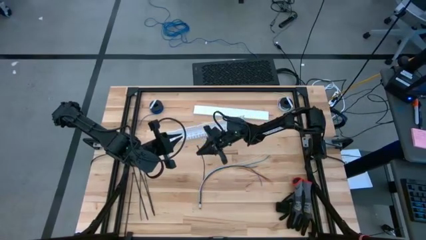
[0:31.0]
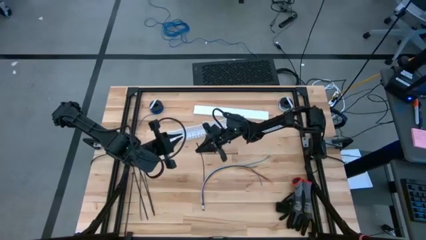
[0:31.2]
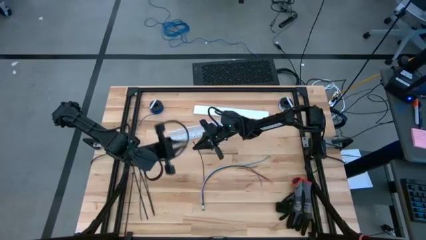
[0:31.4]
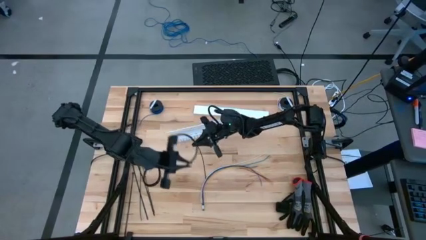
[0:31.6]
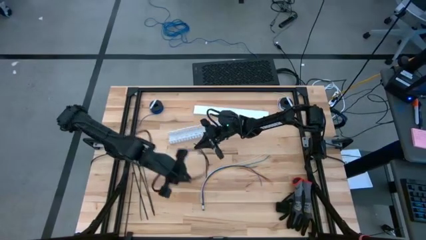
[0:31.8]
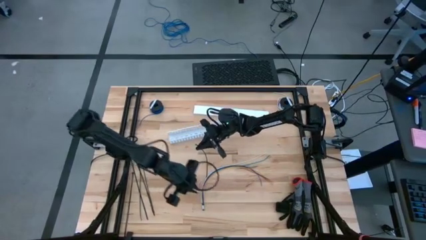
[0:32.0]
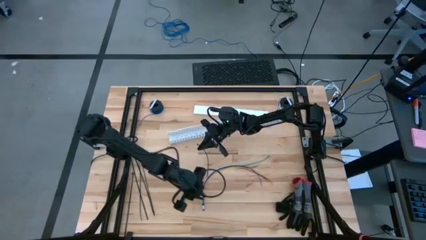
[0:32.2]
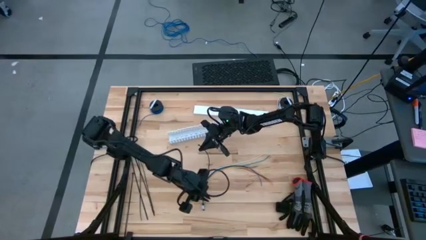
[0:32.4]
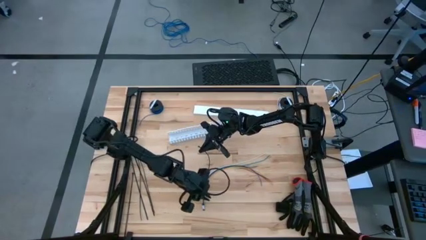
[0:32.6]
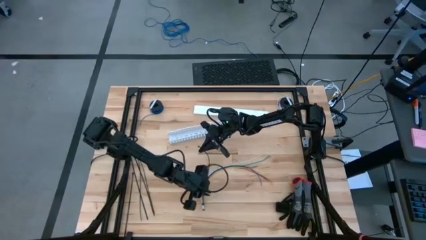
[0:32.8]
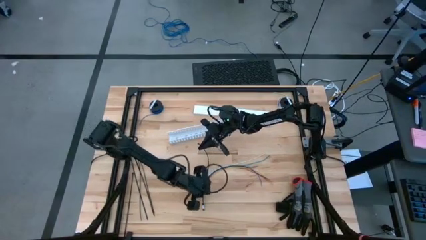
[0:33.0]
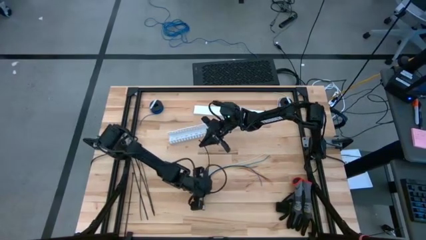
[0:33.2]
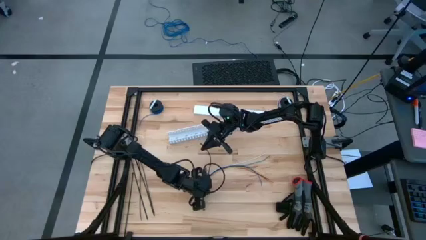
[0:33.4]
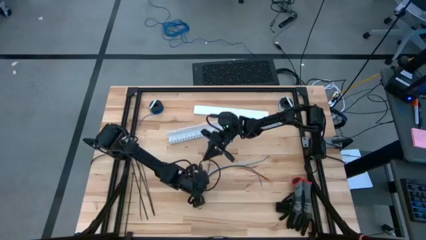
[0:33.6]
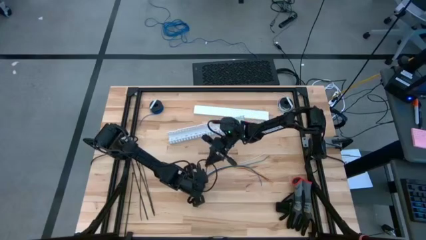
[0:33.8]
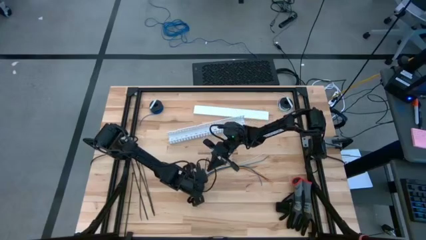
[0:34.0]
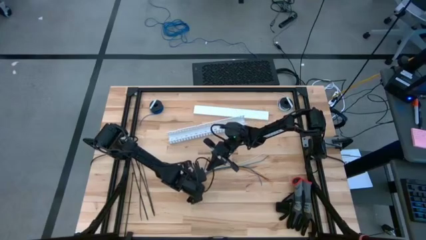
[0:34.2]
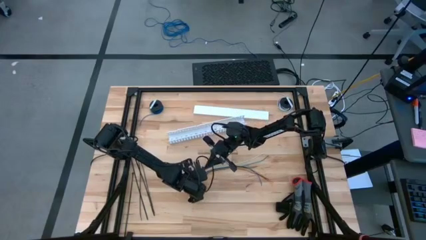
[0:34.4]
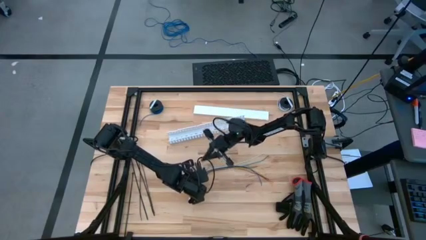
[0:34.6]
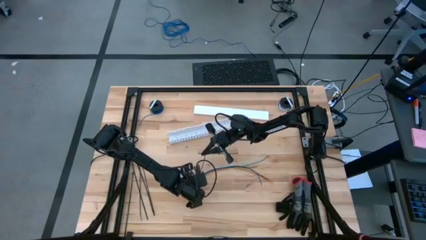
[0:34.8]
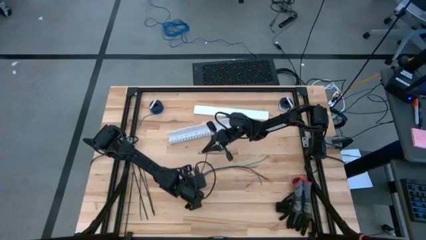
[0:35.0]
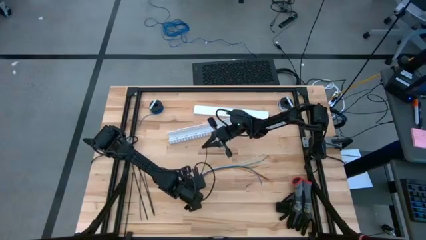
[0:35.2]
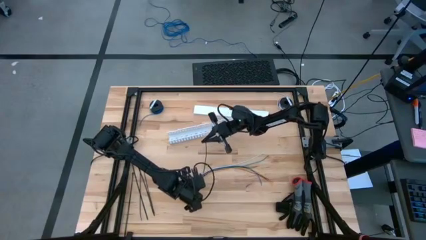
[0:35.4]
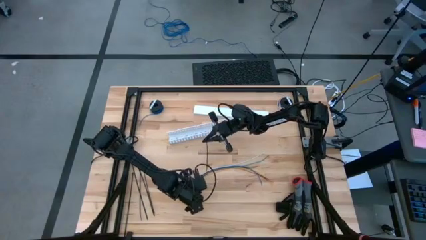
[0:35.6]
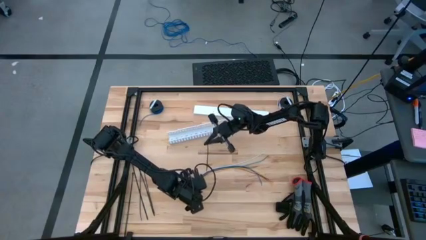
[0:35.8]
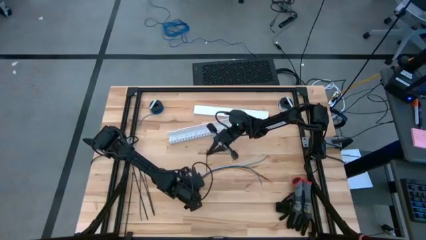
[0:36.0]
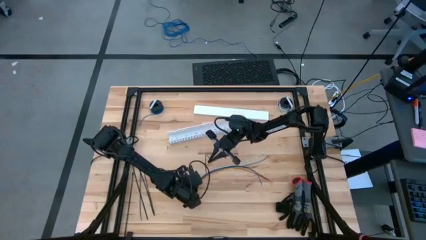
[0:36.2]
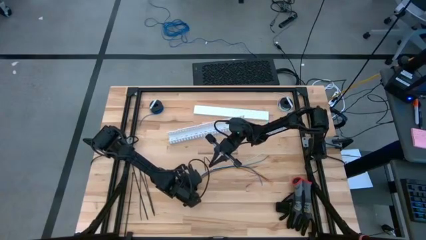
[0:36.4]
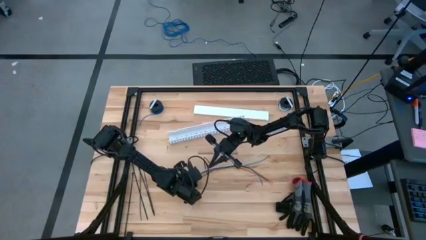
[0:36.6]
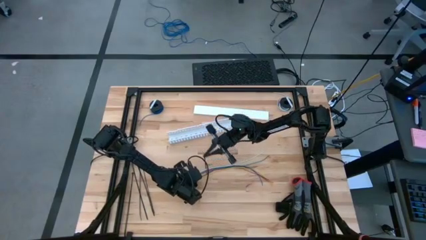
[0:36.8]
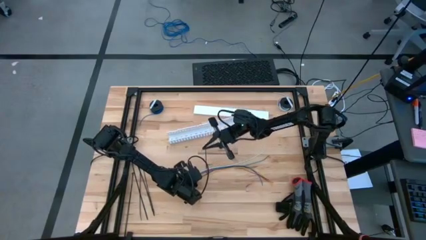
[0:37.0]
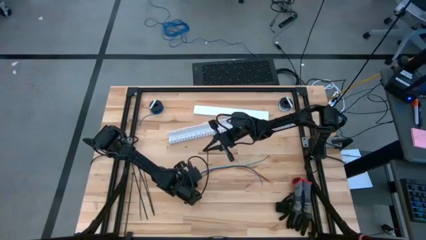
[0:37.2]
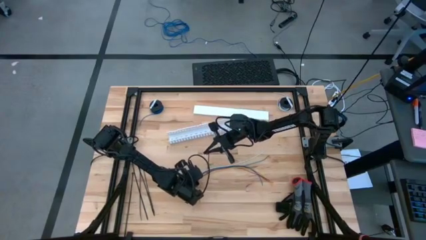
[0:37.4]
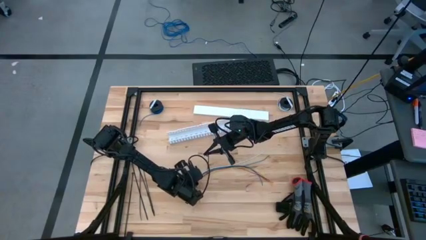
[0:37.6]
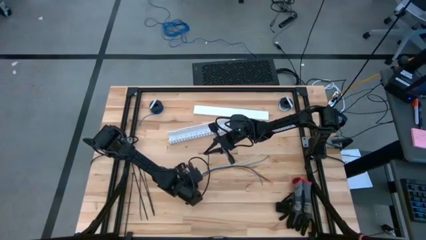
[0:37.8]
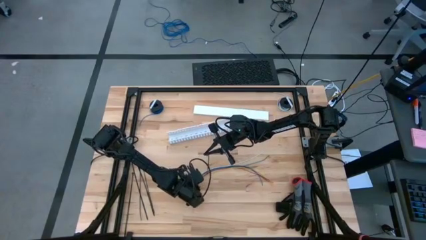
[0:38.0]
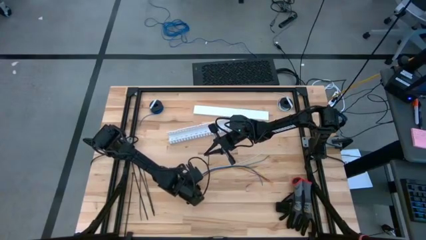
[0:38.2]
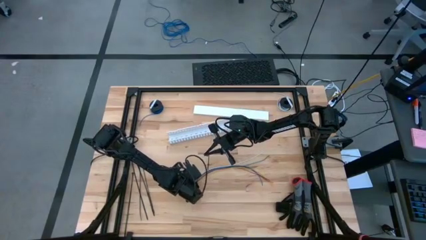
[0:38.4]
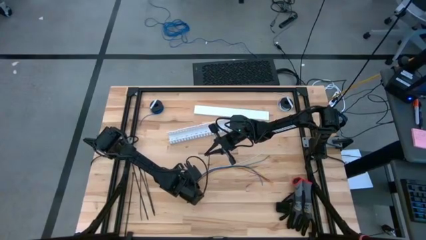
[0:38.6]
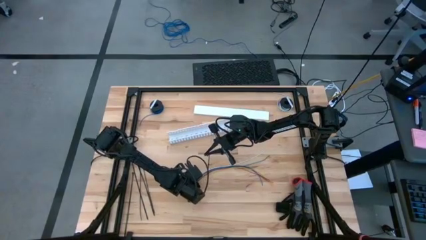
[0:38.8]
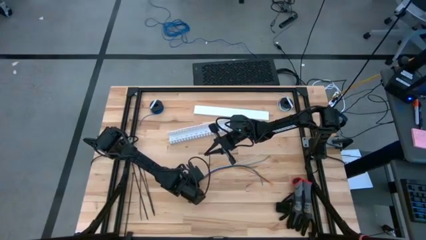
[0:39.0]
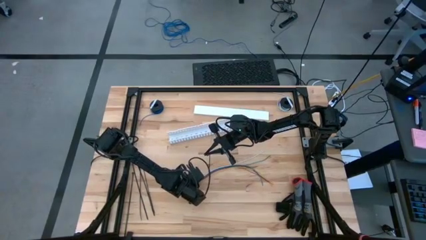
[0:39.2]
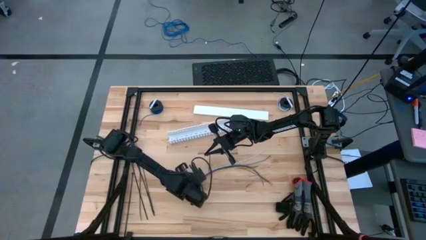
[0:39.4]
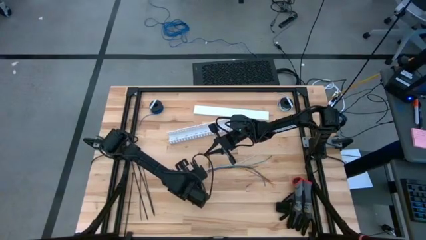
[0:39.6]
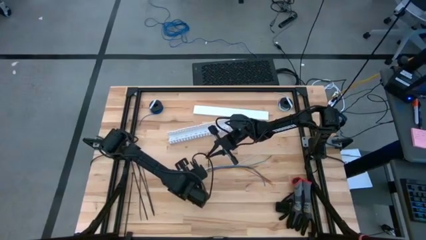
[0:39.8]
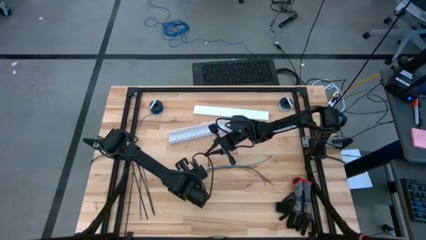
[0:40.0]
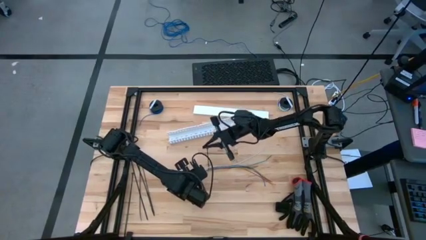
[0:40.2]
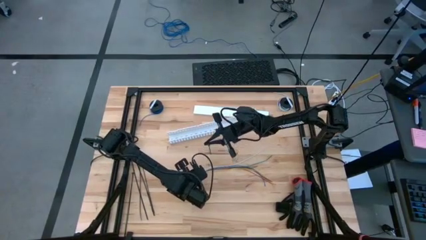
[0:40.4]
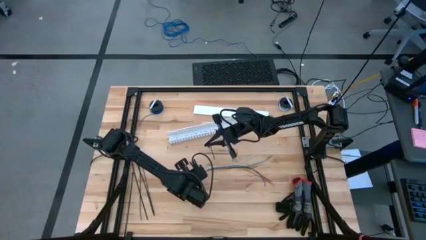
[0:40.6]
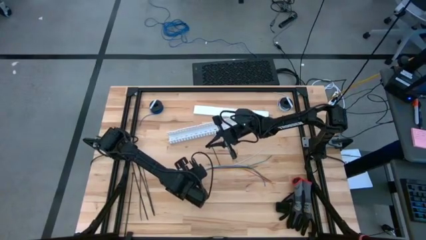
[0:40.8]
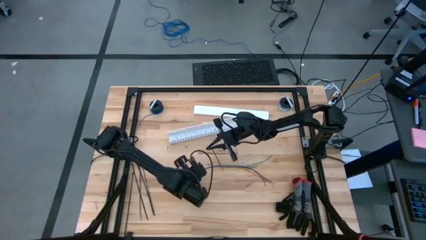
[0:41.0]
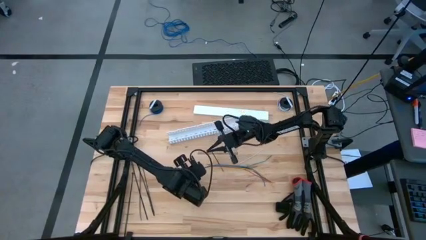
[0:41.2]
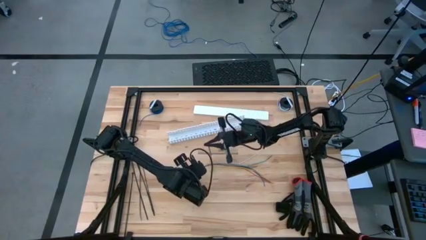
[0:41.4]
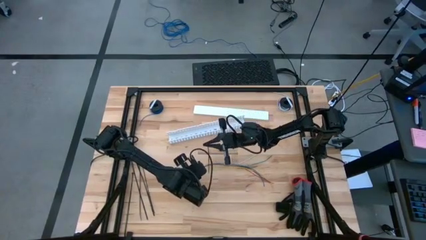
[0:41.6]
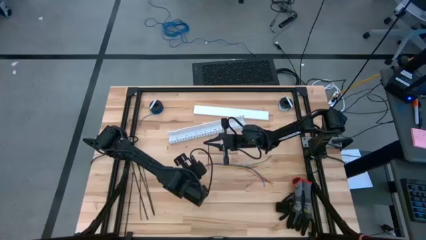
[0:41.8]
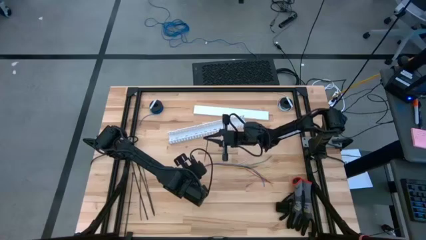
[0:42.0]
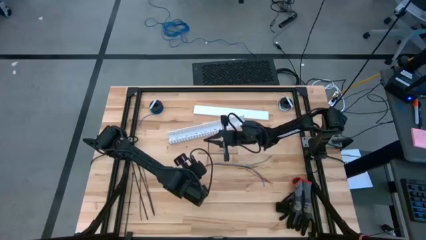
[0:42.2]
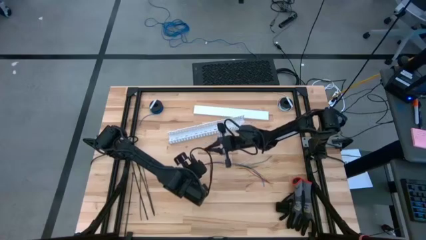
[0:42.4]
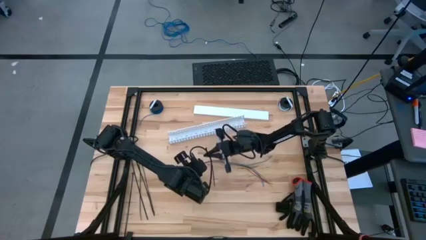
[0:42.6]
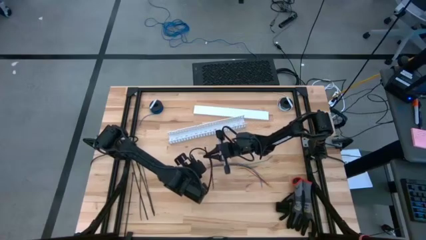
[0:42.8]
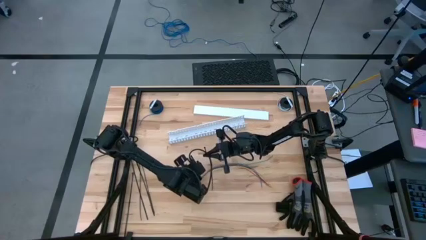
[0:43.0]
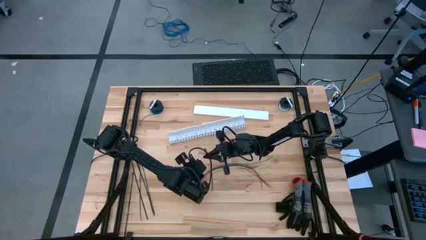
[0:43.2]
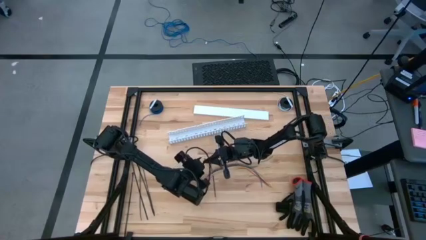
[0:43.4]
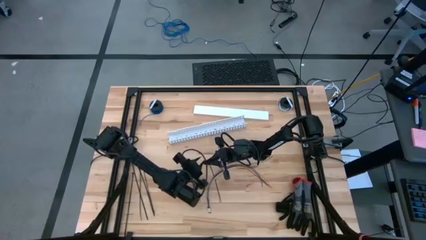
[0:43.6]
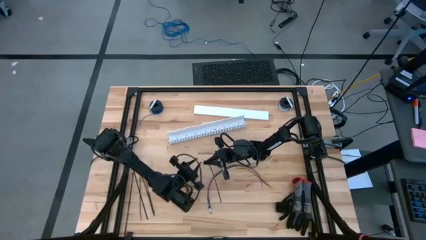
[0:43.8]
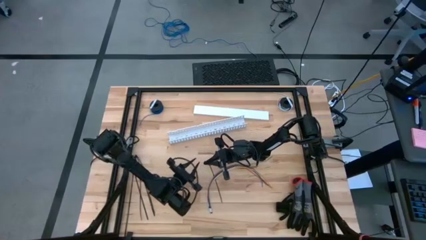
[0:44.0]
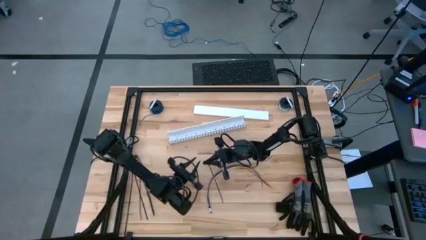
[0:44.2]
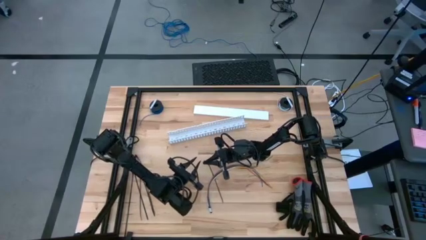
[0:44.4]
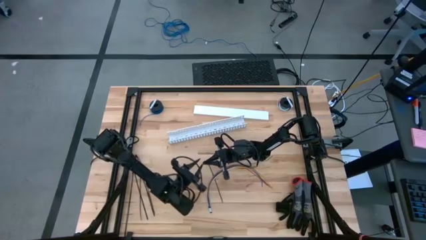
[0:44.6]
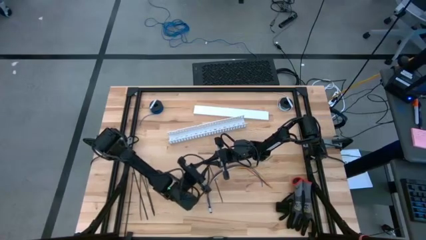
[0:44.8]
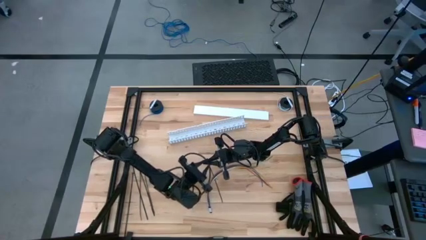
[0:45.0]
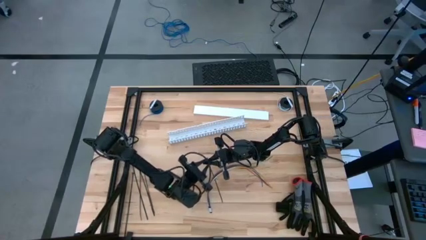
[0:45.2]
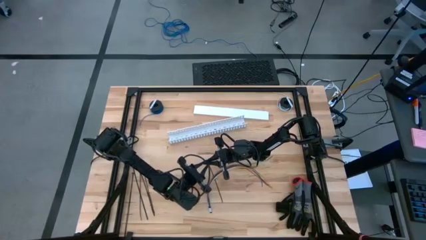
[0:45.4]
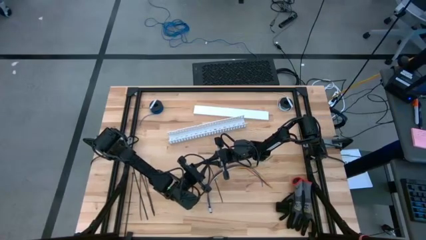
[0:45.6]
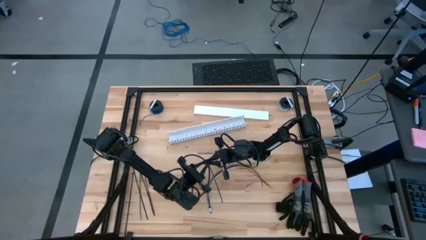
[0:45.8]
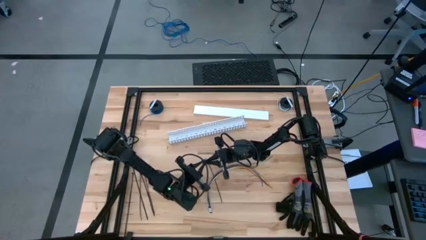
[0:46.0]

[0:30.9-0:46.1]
Task: Ziptie cables
Wrap the colored loose cables with the black zip tie
